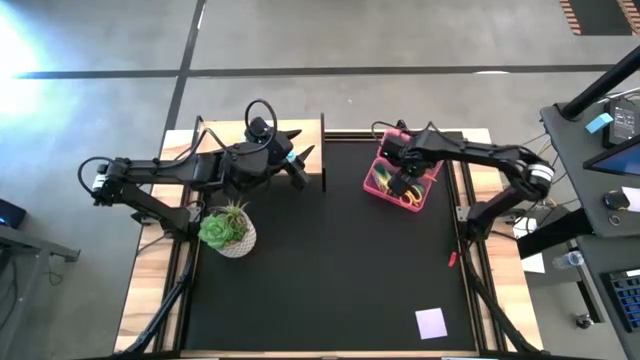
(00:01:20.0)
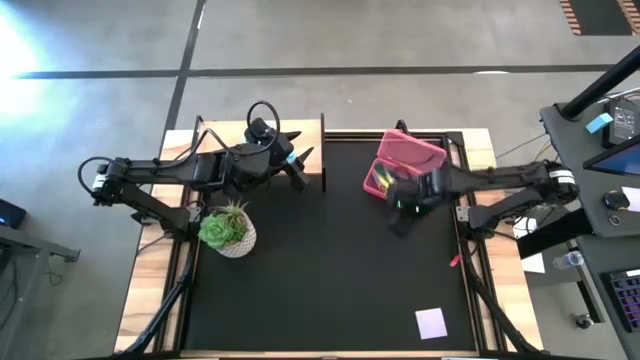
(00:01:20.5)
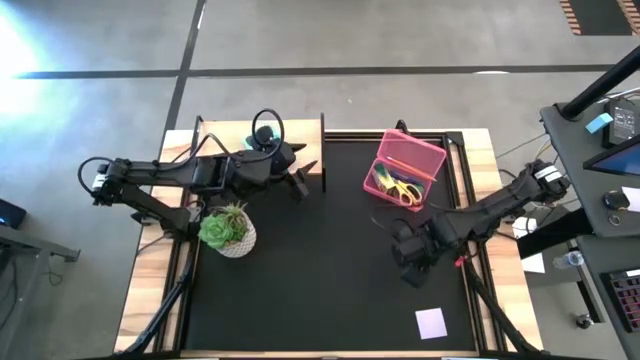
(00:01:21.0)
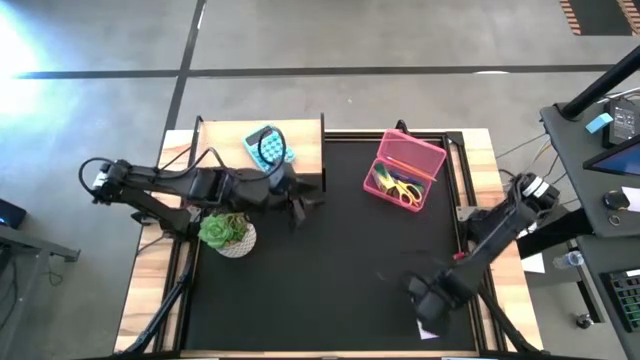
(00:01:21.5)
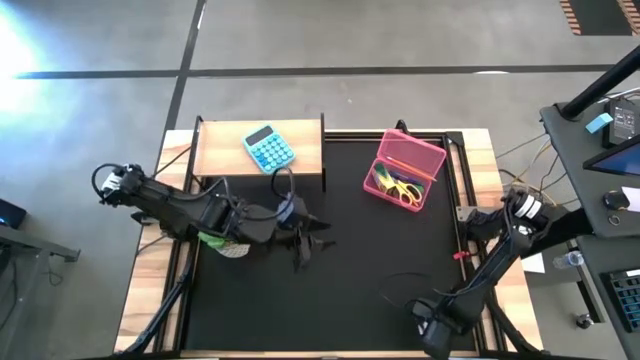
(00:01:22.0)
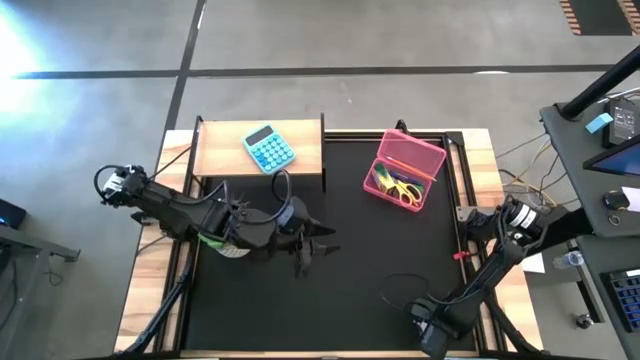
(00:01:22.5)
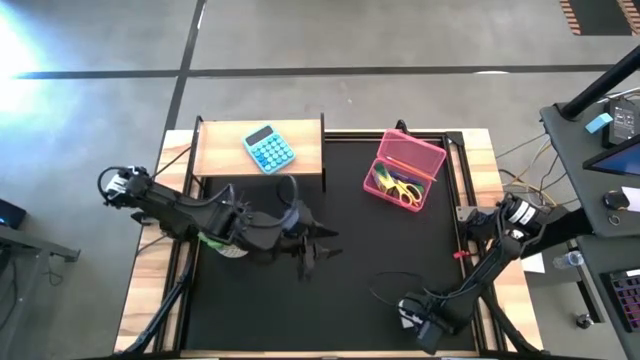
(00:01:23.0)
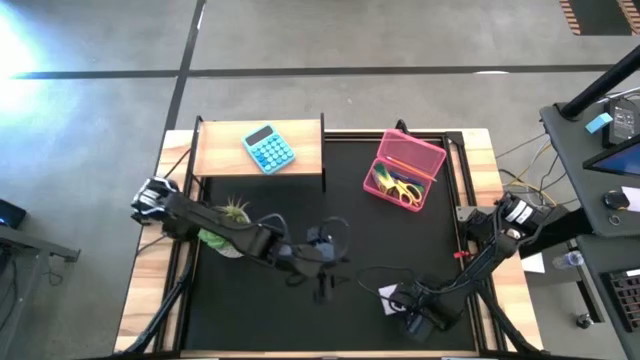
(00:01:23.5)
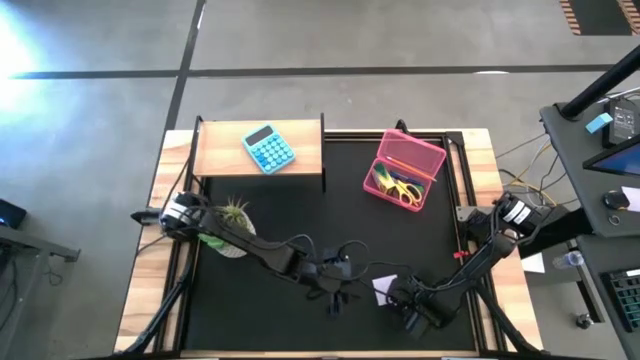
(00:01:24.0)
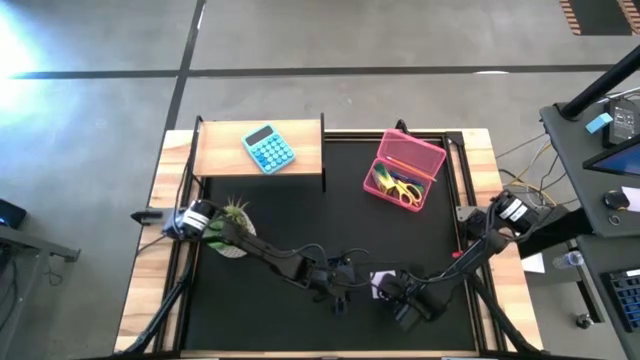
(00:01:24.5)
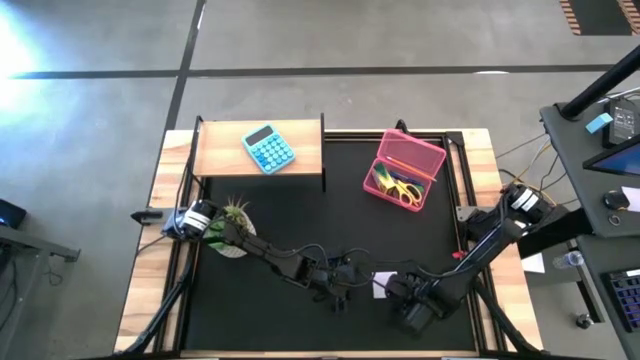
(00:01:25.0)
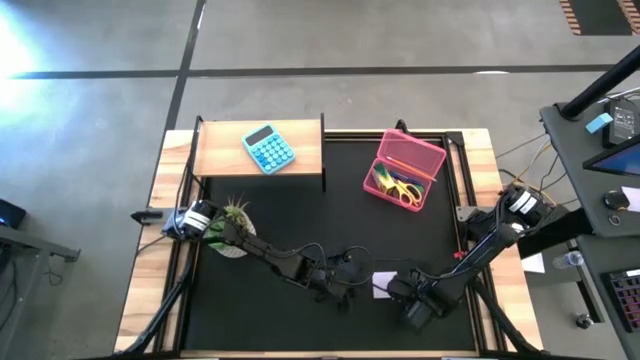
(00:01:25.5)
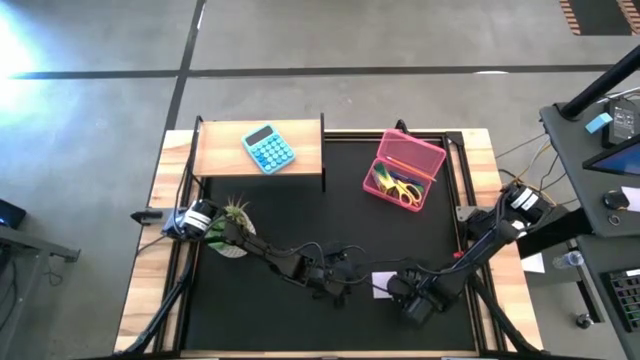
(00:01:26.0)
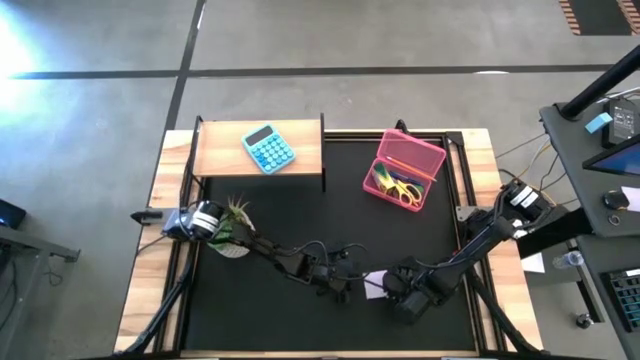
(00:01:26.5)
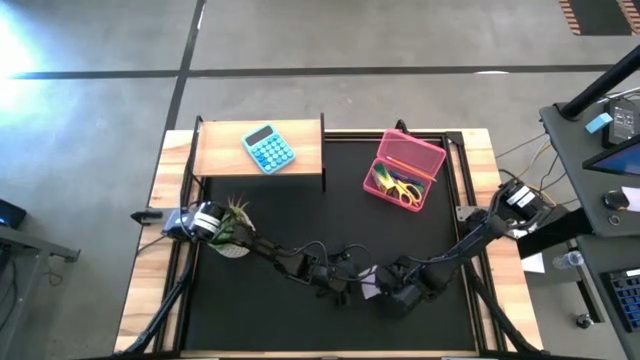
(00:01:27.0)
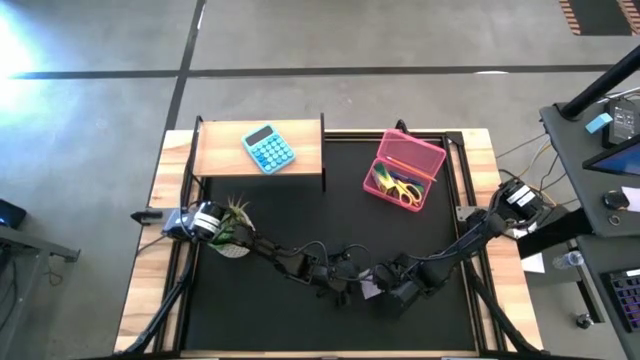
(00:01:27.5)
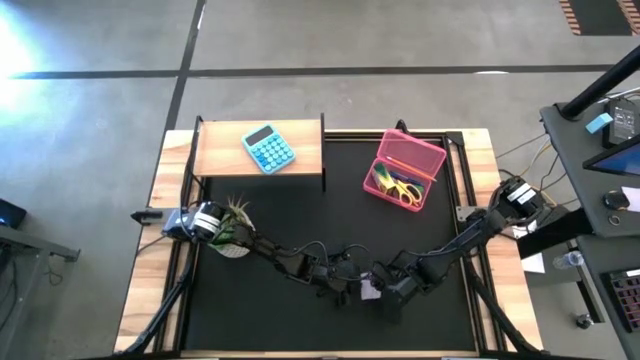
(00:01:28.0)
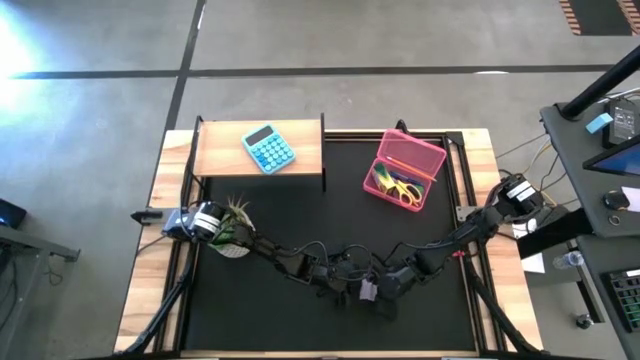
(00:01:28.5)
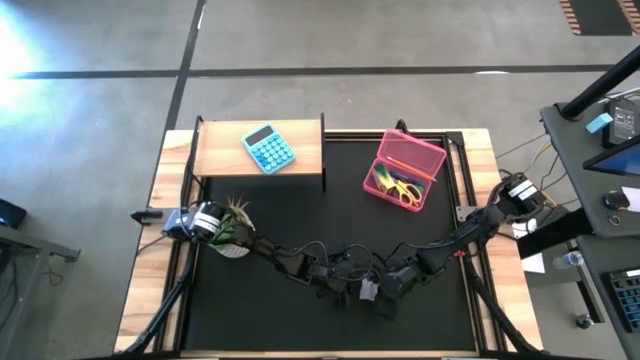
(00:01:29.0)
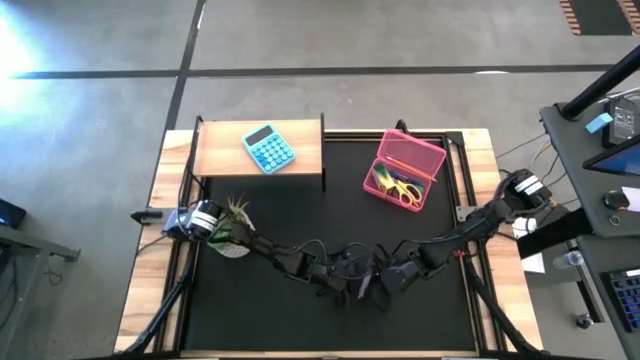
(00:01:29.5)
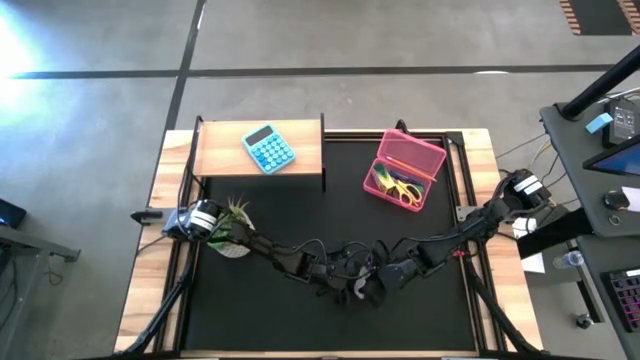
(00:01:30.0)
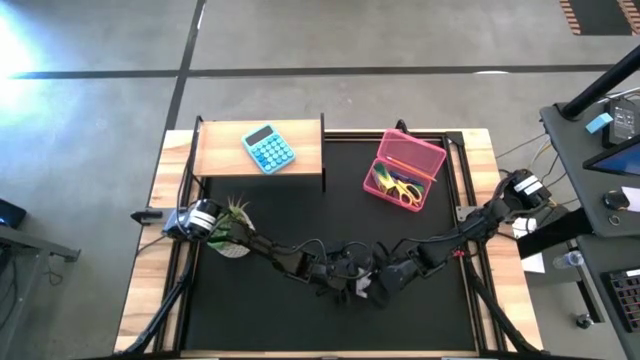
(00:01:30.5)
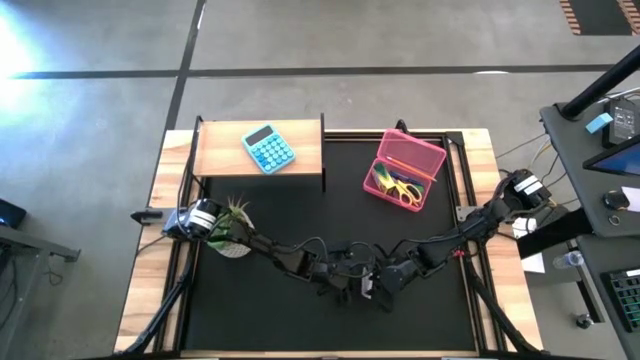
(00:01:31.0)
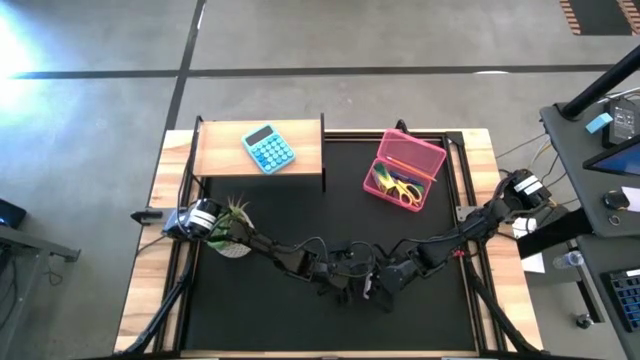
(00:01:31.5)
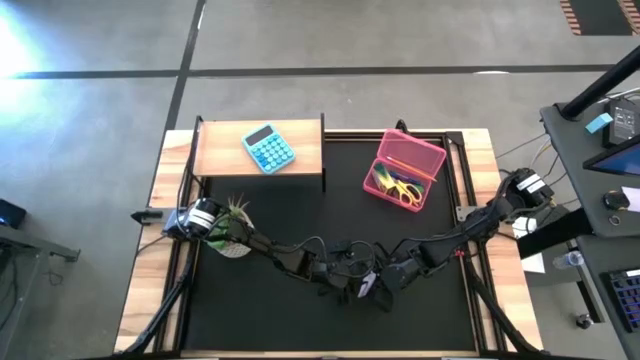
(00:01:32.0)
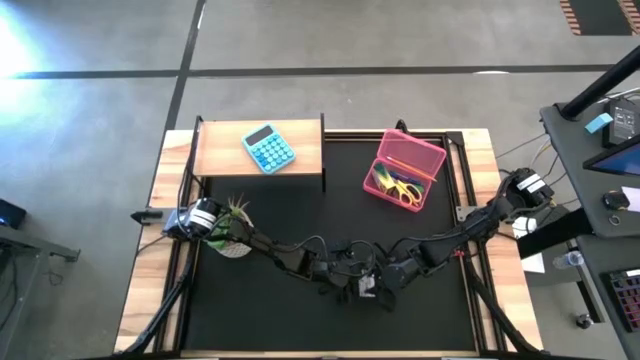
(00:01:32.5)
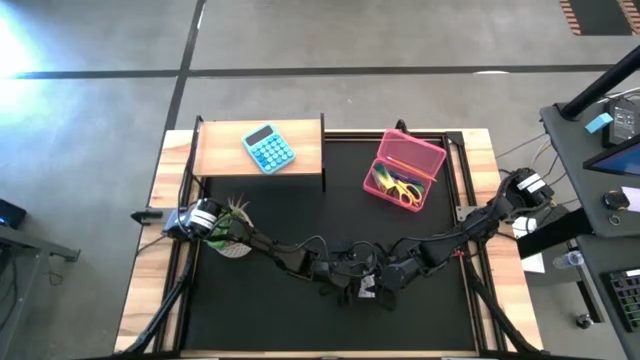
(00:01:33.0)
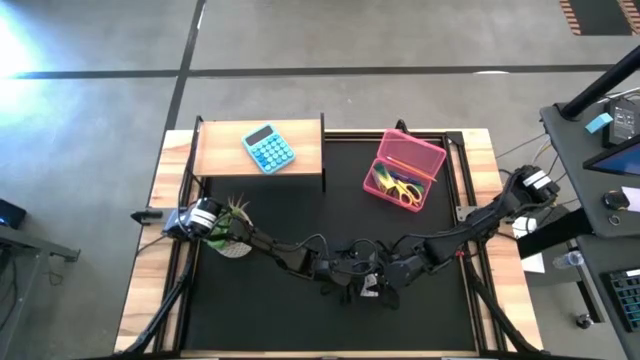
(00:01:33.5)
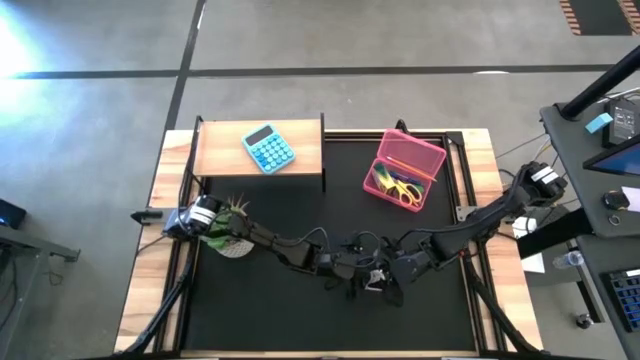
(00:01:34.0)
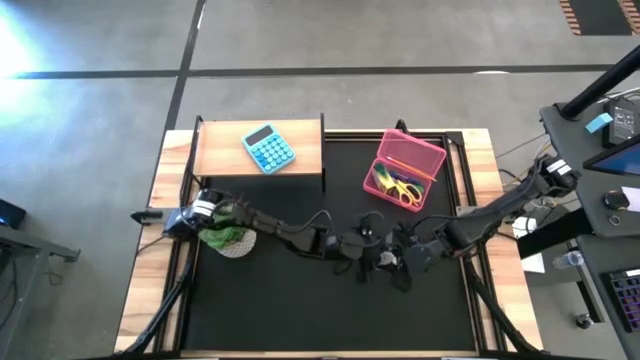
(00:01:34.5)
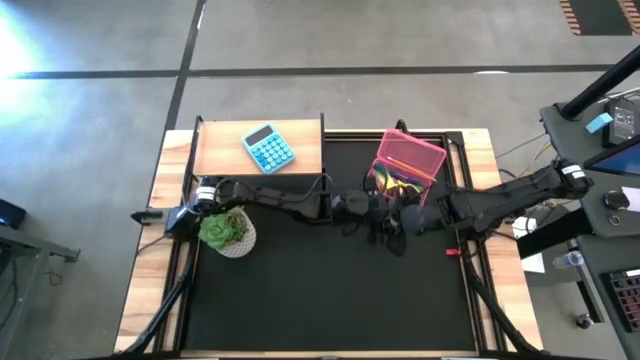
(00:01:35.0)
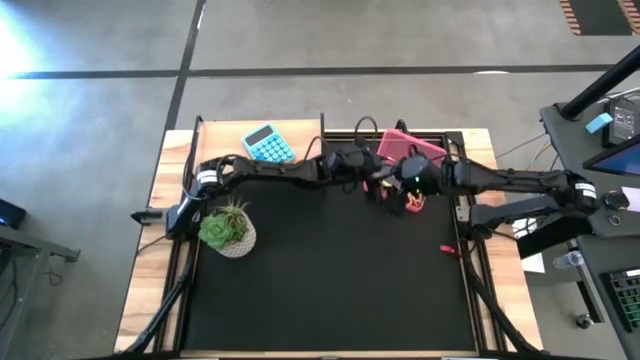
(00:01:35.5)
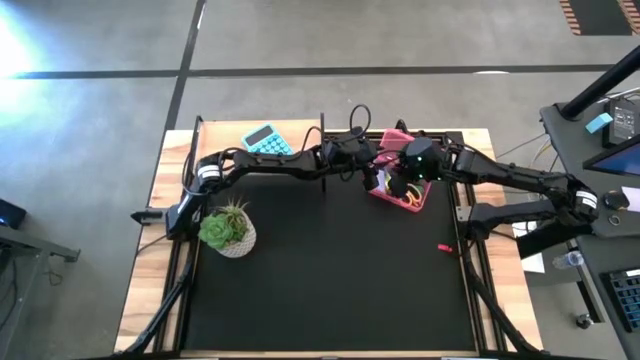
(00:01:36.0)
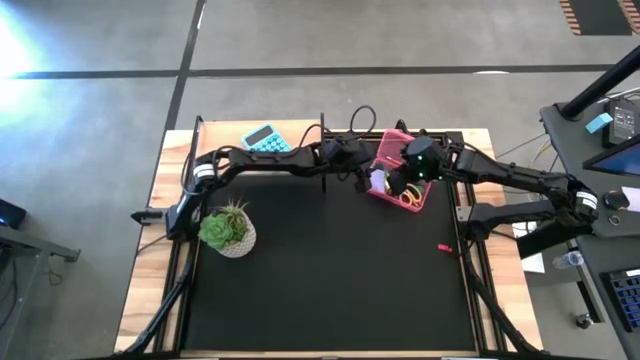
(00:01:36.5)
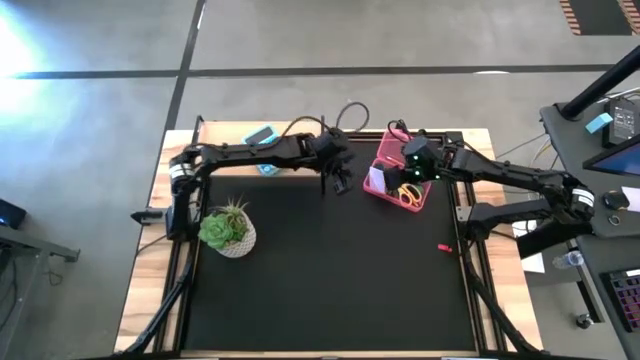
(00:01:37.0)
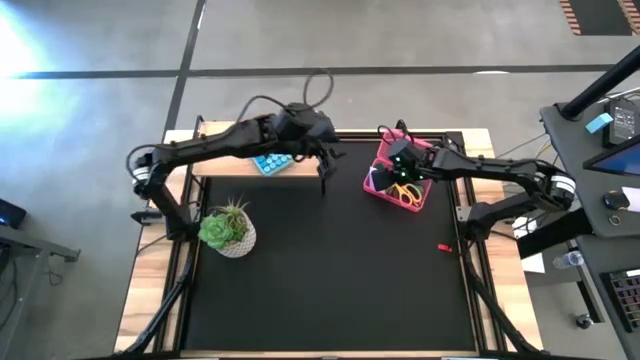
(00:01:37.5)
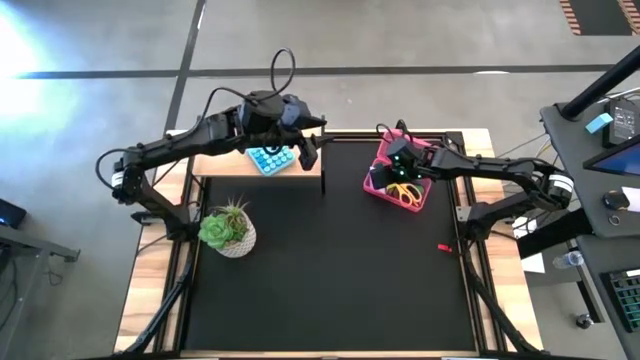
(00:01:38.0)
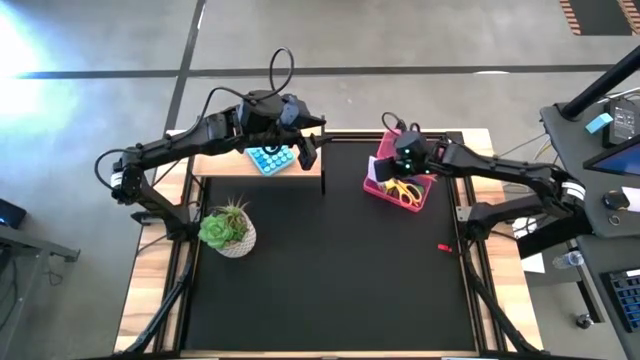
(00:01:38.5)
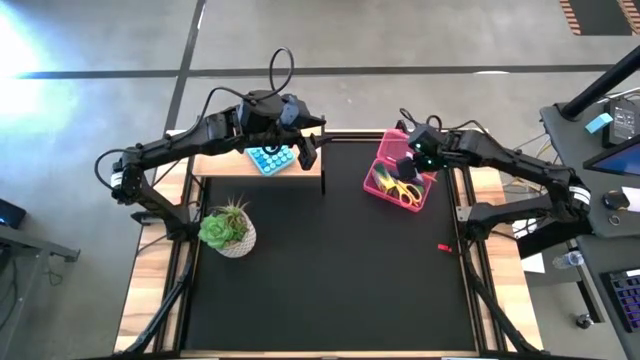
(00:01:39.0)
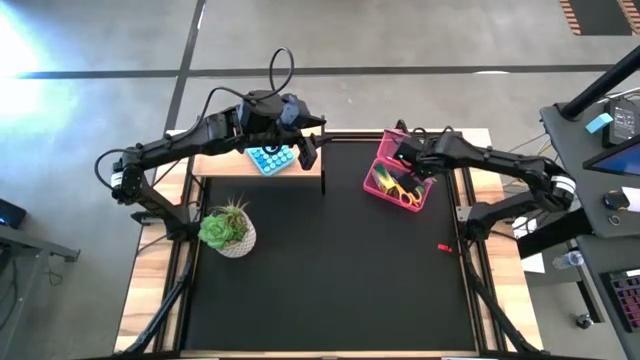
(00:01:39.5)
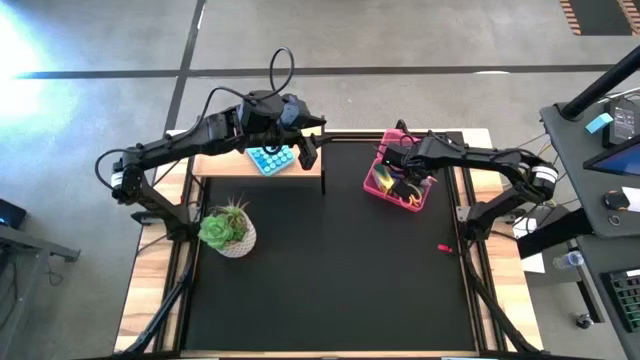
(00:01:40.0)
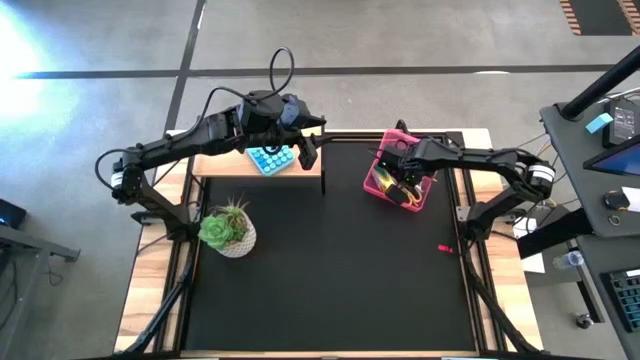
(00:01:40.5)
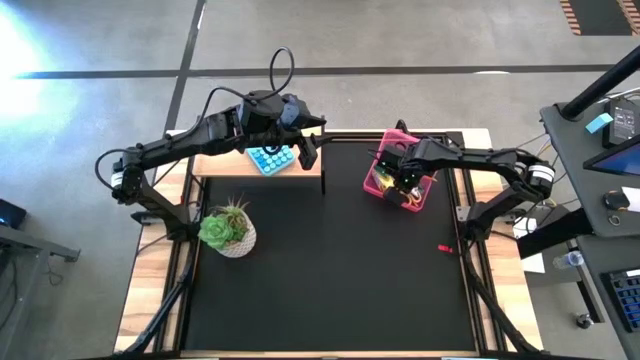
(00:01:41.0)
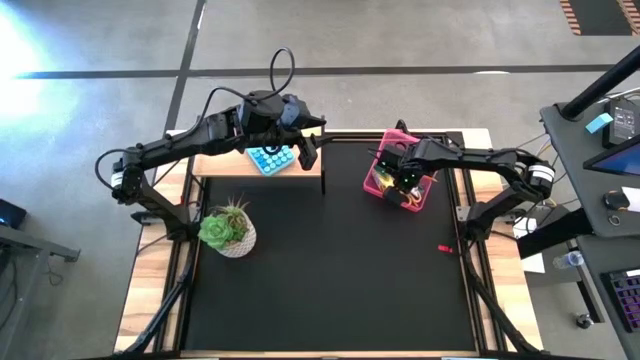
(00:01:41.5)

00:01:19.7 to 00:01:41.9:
Task: Pack school essentials
Put the purple sticky notes into the pink supply box
